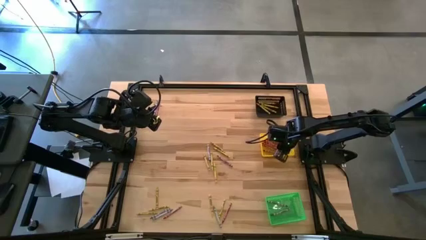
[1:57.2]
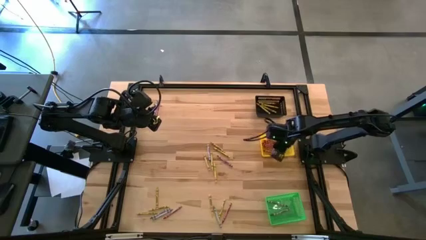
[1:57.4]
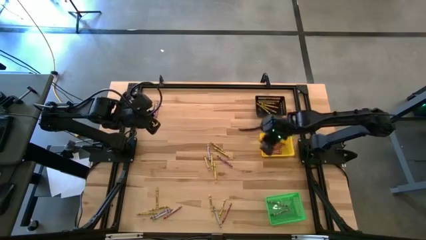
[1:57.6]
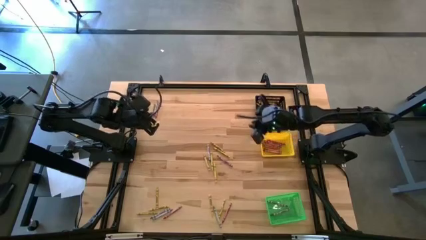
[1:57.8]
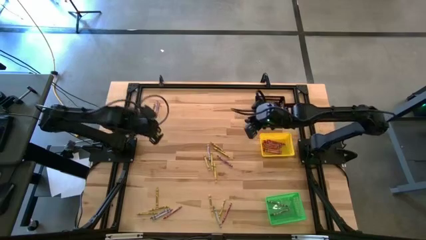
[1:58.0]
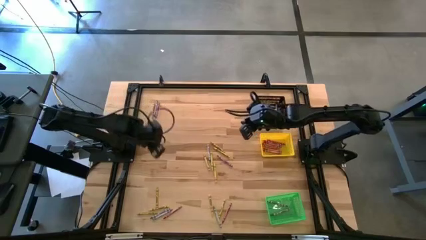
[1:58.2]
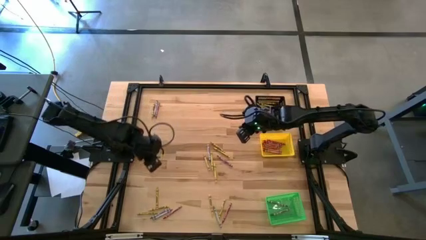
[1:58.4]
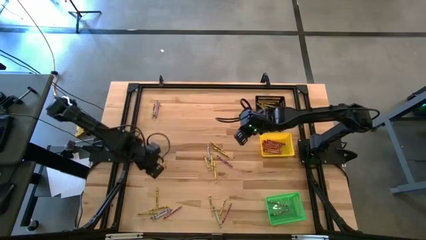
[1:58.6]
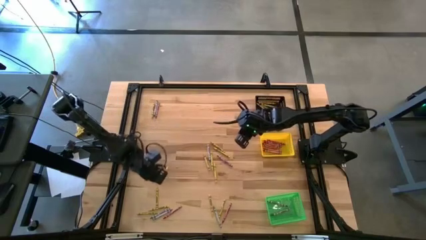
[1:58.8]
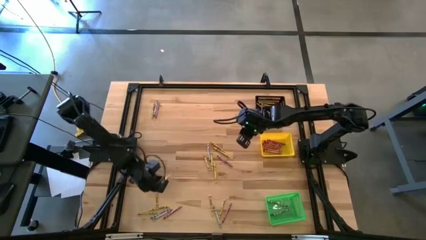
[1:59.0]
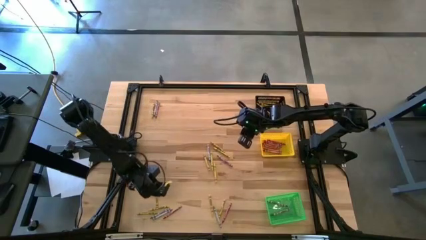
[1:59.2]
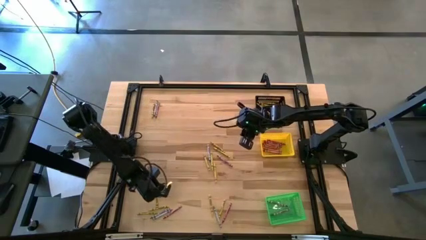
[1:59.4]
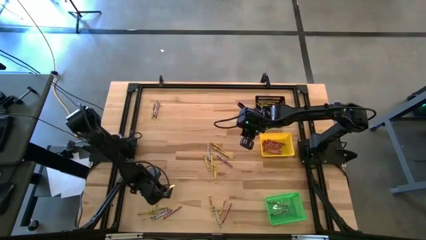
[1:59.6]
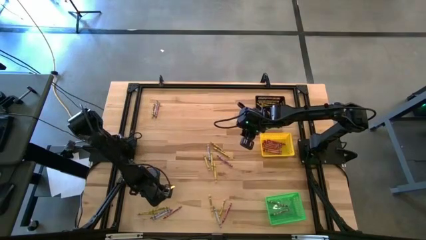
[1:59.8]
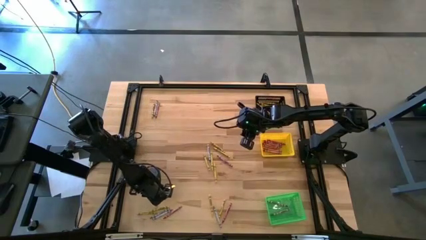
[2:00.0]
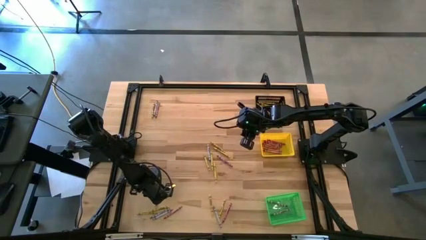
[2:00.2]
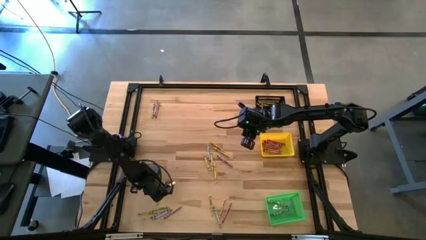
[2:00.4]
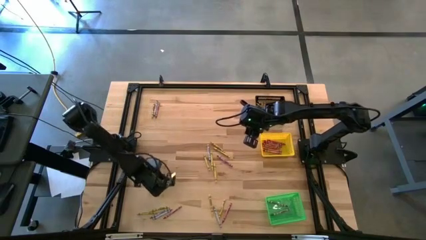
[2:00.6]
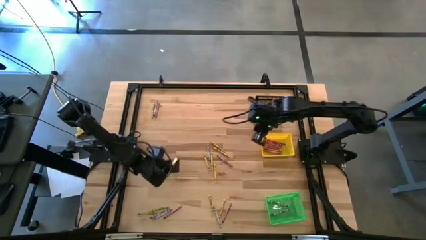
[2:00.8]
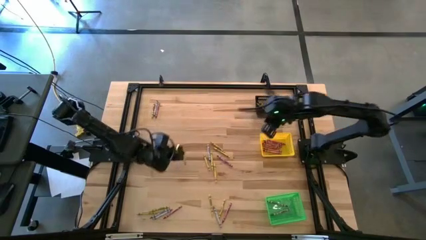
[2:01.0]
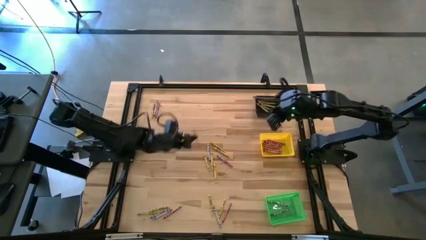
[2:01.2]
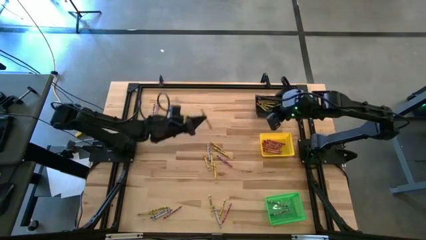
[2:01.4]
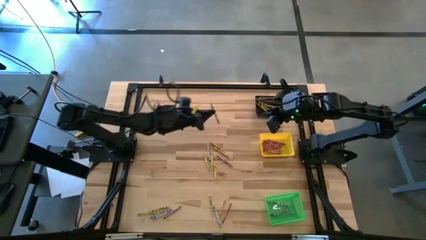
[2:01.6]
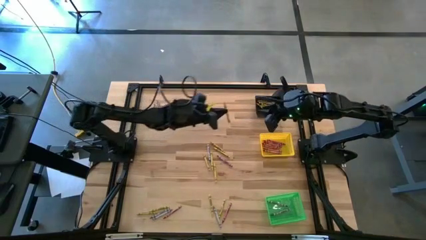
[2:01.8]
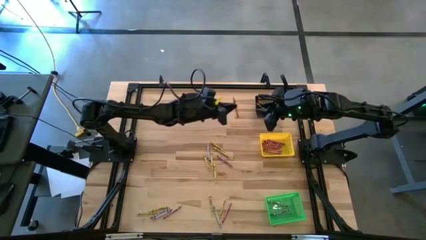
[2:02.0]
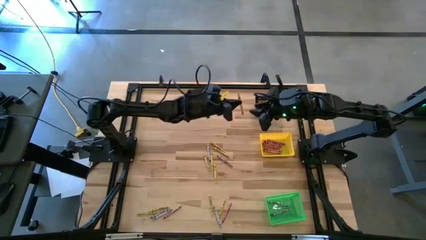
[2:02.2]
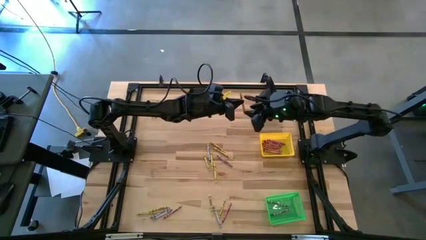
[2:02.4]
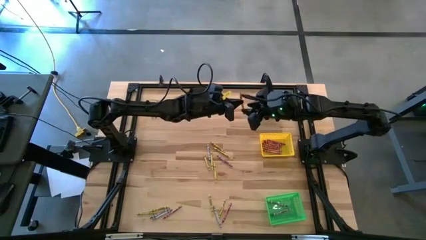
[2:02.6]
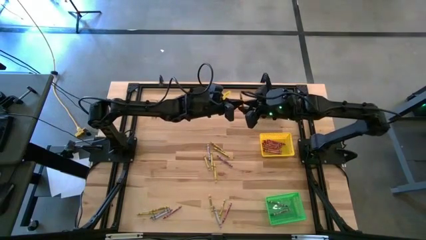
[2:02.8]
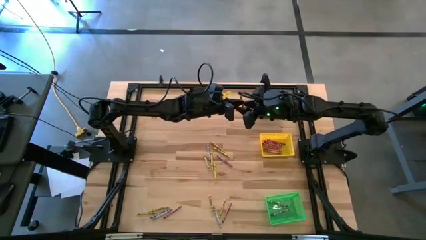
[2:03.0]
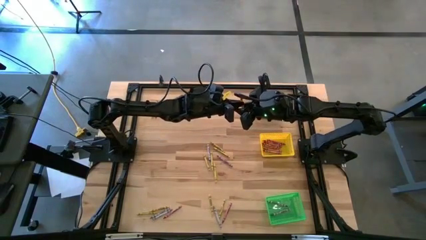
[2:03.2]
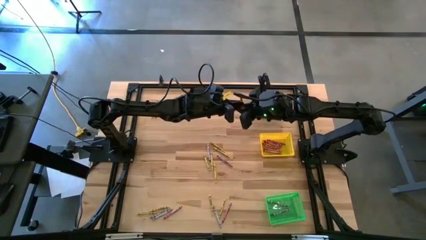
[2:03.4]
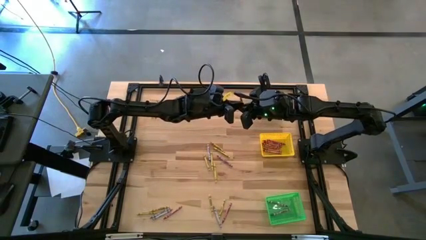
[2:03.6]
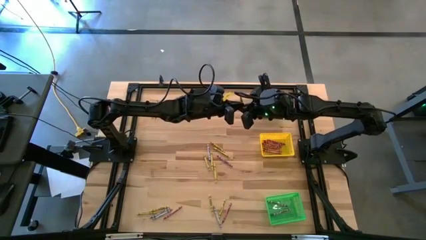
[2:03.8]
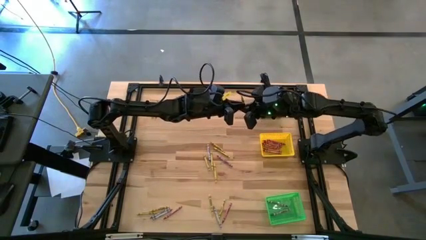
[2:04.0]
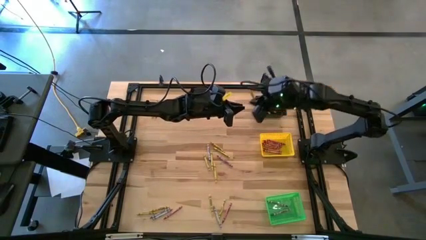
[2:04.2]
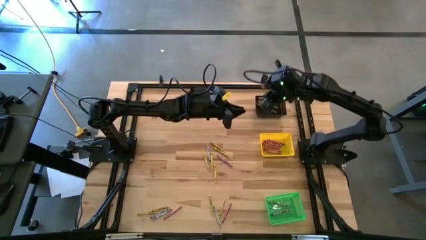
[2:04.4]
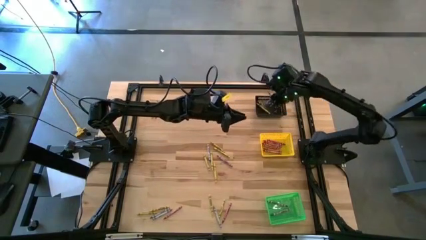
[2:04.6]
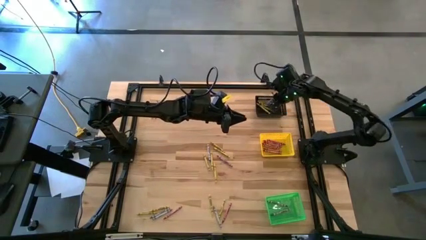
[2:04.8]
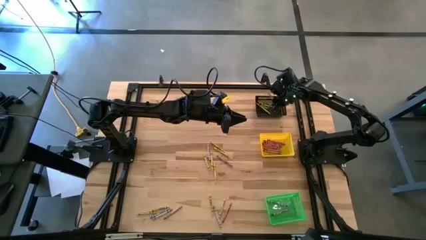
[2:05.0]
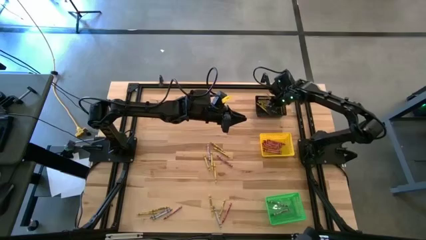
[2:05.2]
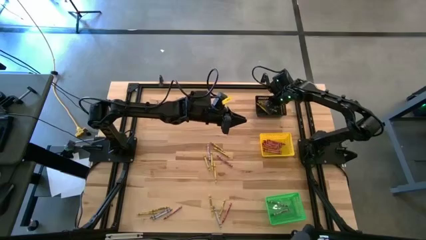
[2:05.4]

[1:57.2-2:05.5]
Task: Sort crayons
Put the yellow crayon into the black bin

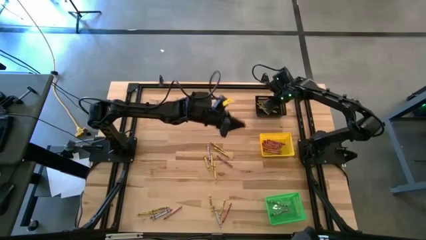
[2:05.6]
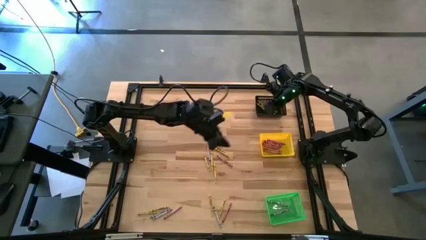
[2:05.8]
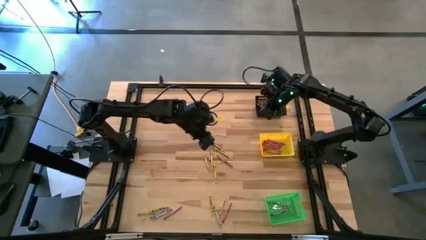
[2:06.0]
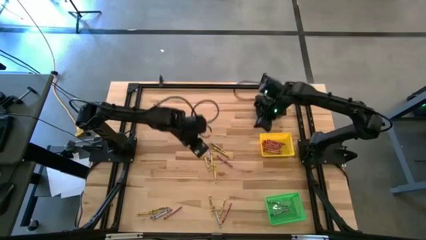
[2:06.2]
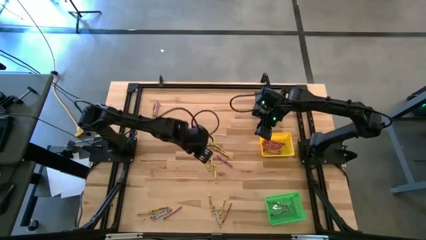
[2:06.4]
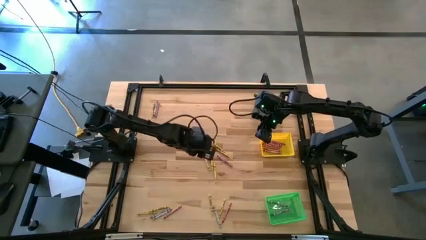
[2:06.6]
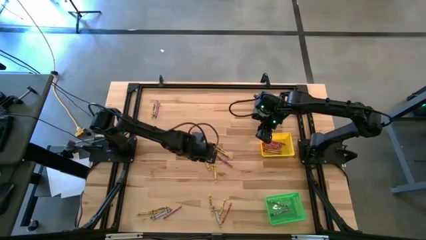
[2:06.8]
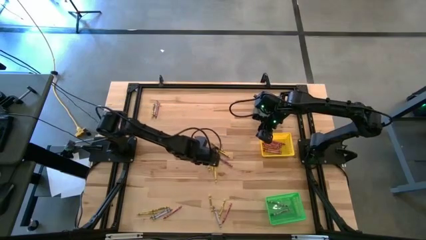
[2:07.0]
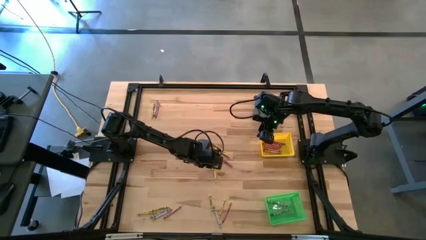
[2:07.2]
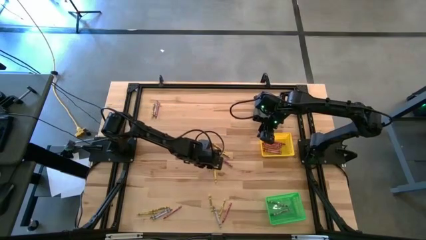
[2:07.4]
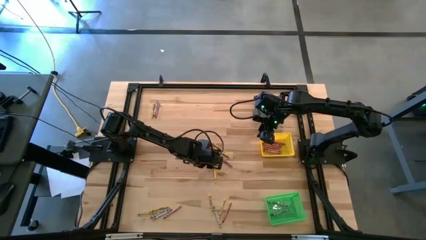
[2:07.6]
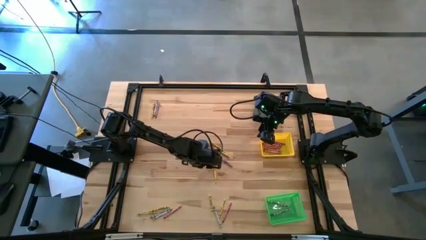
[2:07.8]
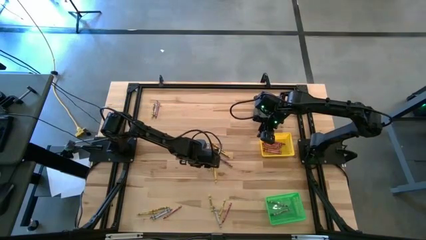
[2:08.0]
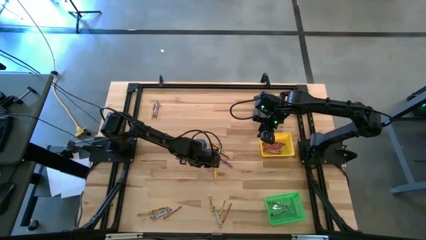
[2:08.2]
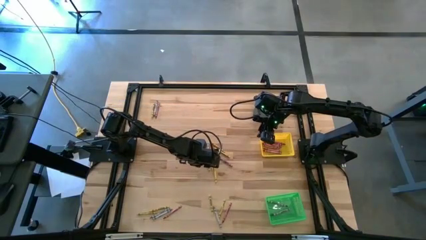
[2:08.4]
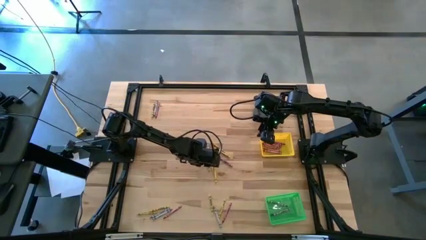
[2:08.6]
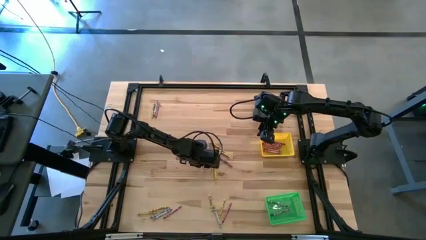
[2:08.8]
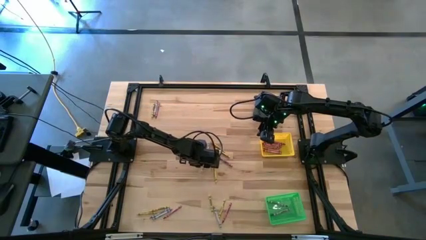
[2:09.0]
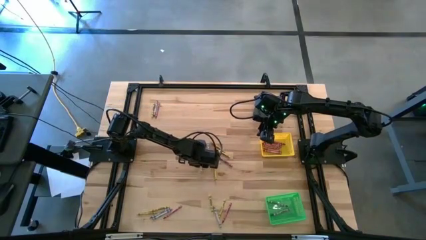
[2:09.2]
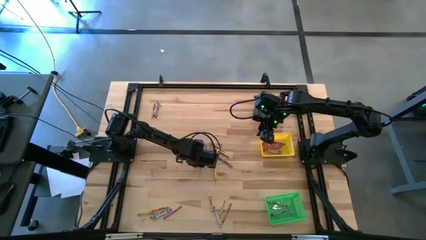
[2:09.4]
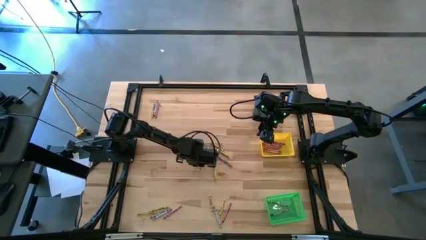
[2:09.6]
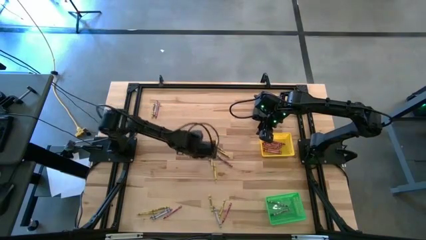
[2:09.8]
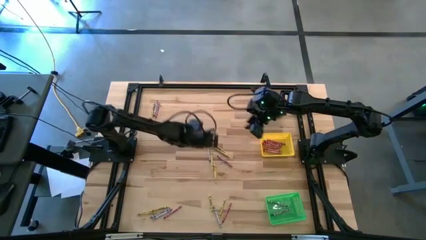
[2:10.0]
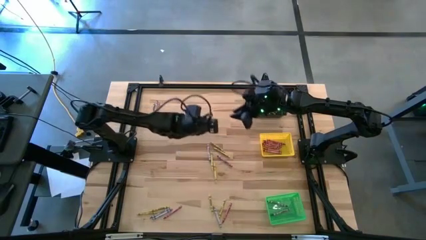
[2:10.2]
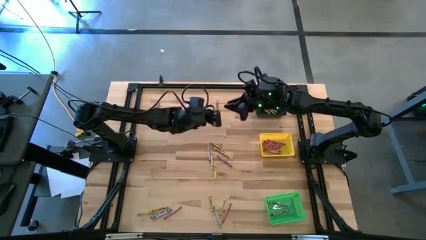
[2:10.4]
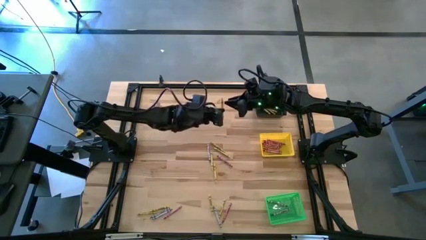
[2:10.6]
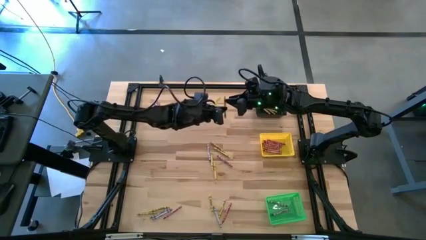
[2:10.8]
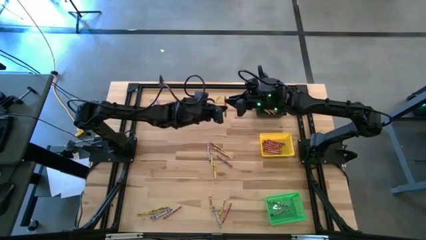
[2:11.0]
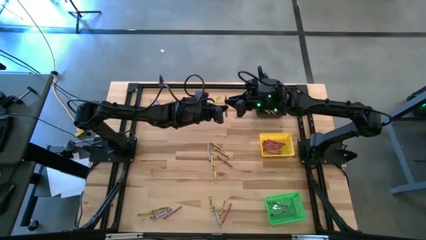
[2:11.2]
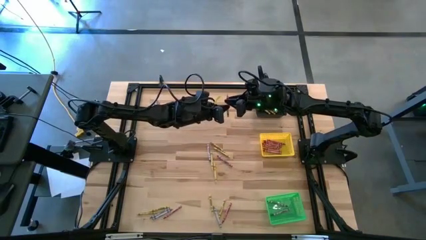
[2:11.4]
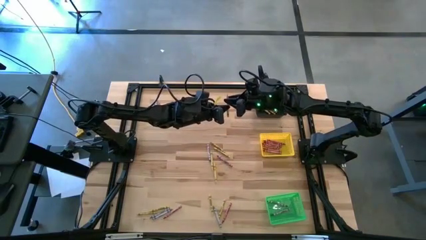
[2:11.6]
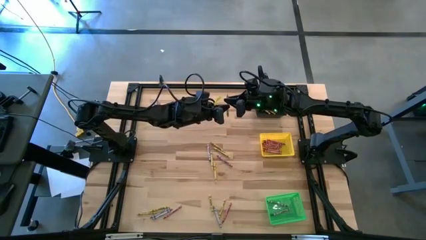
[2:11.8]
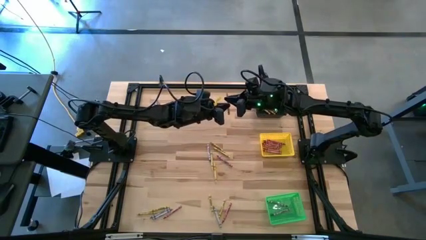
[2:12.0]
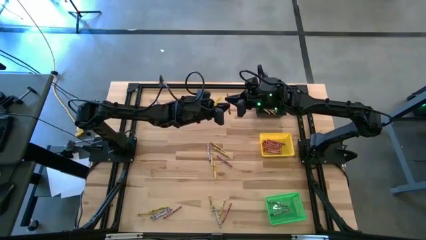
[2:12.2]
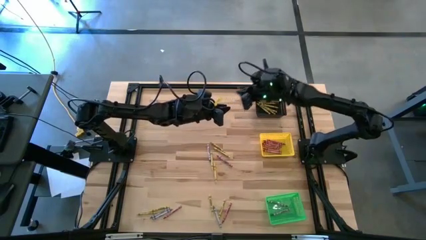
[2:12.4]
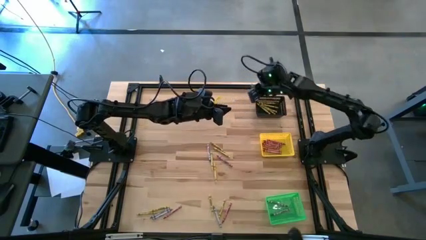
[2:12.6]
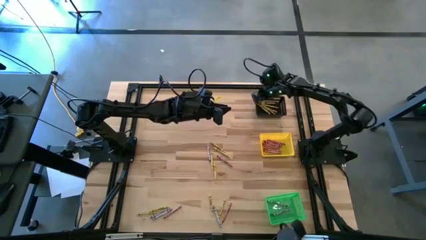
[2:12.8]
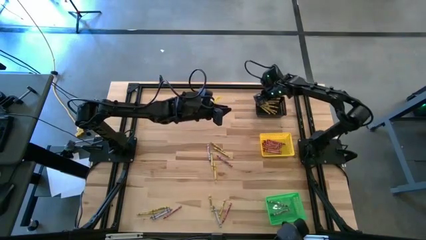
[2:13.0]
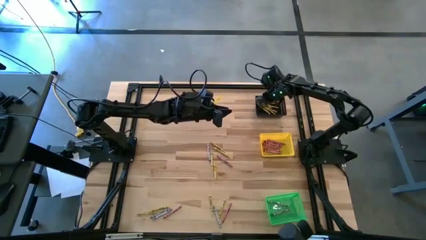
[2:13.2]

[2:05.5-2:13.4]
Put the yellow crayon into the black bin
